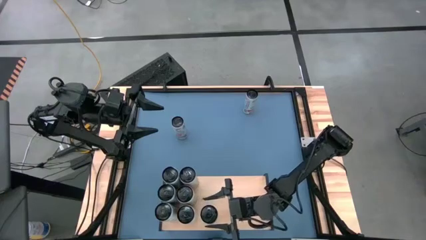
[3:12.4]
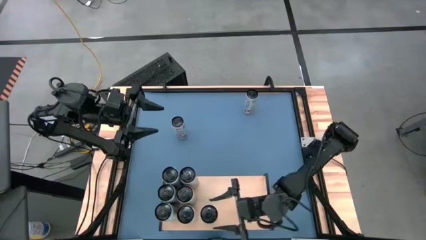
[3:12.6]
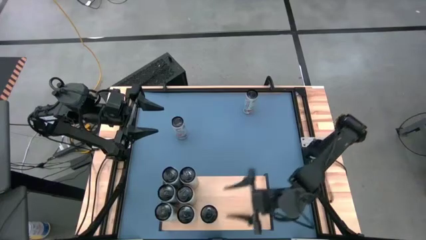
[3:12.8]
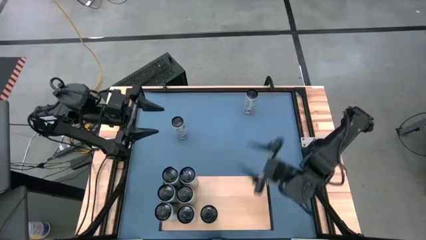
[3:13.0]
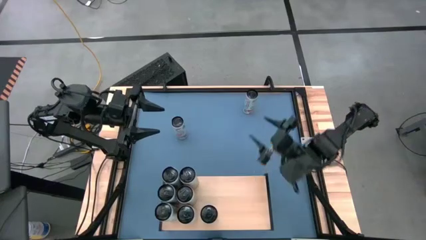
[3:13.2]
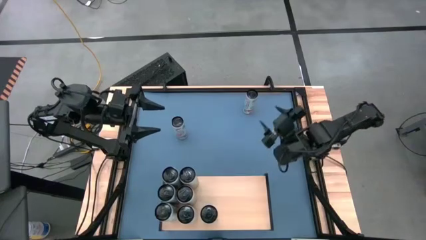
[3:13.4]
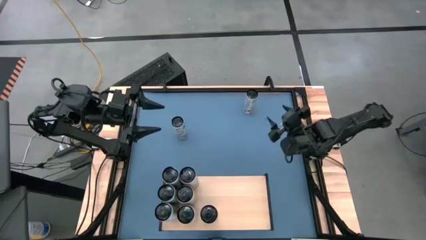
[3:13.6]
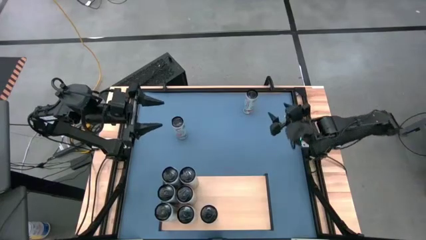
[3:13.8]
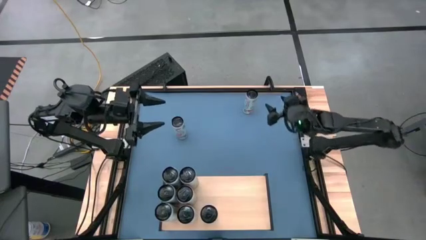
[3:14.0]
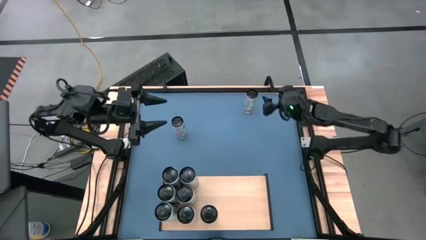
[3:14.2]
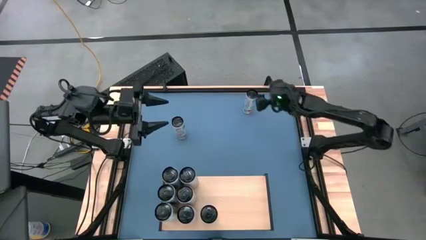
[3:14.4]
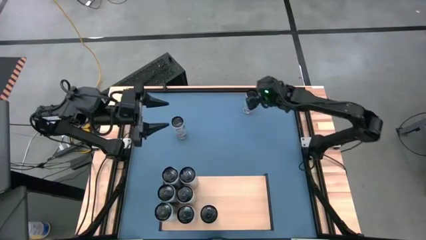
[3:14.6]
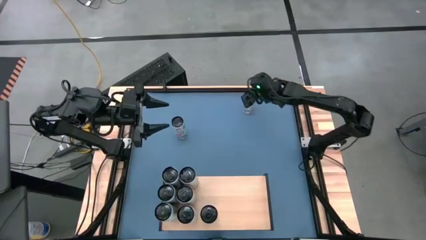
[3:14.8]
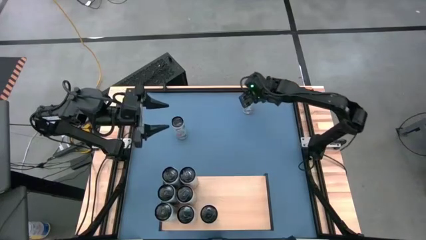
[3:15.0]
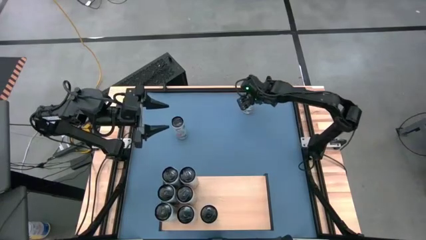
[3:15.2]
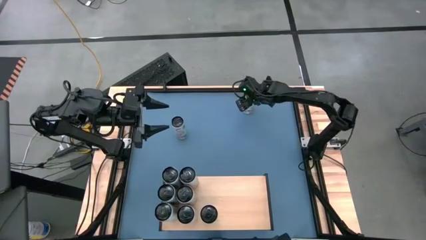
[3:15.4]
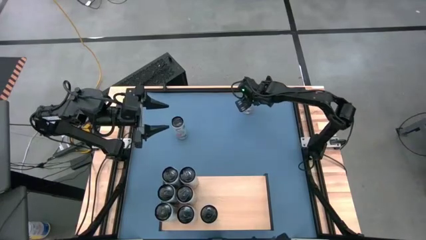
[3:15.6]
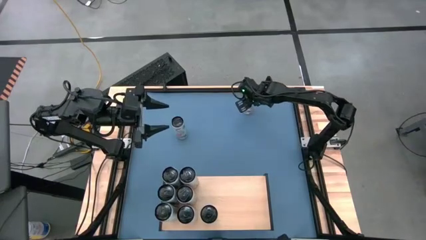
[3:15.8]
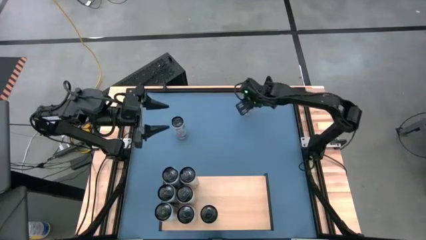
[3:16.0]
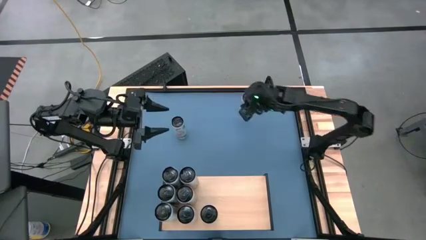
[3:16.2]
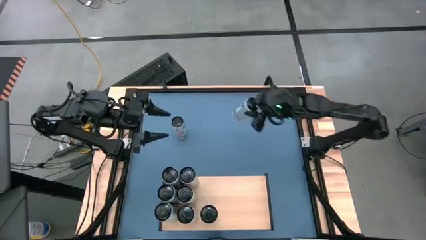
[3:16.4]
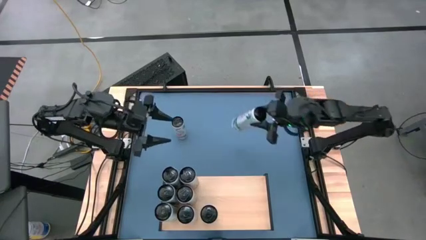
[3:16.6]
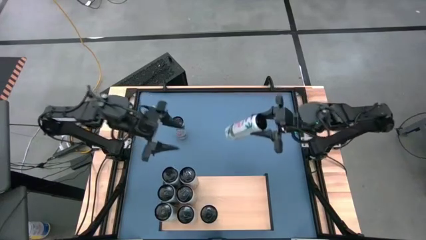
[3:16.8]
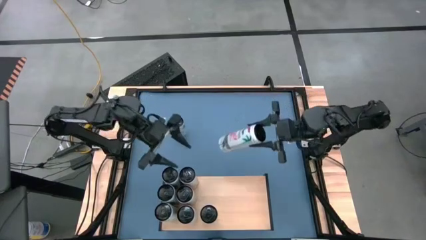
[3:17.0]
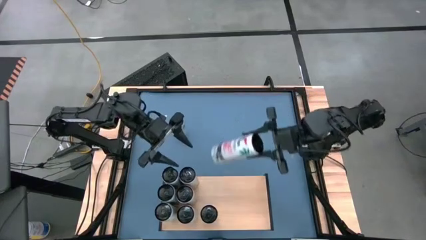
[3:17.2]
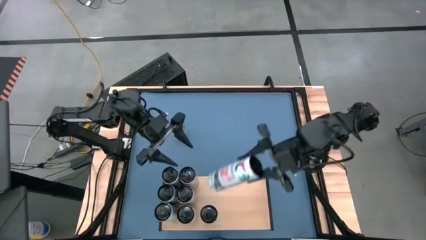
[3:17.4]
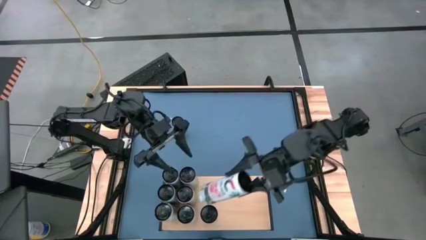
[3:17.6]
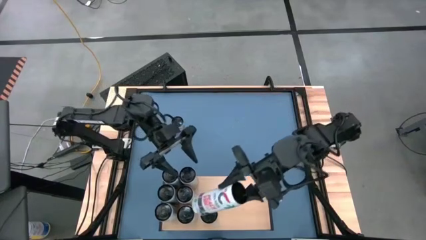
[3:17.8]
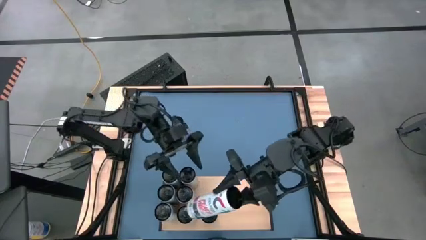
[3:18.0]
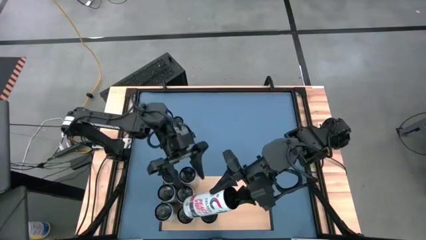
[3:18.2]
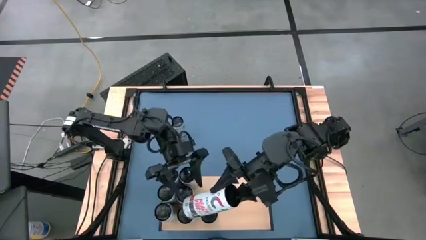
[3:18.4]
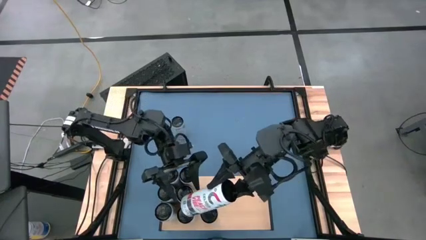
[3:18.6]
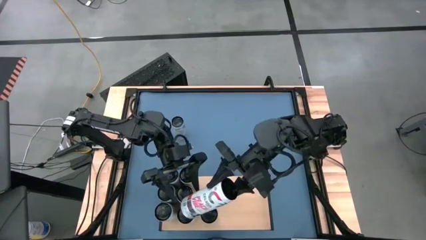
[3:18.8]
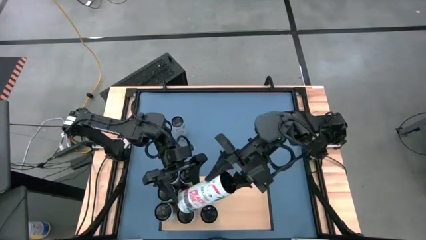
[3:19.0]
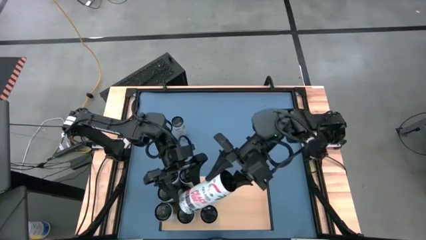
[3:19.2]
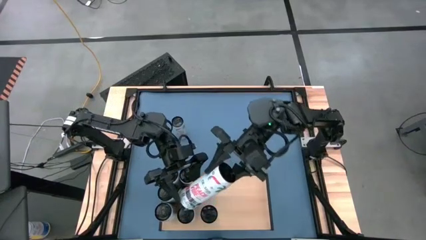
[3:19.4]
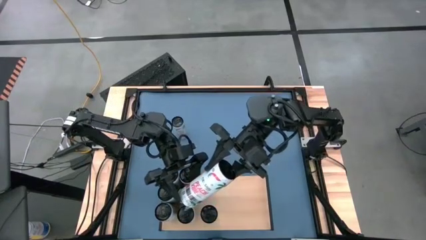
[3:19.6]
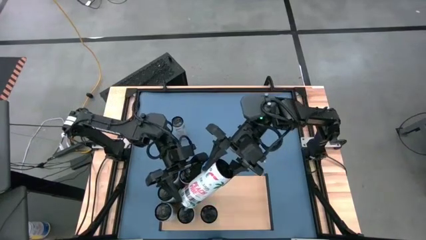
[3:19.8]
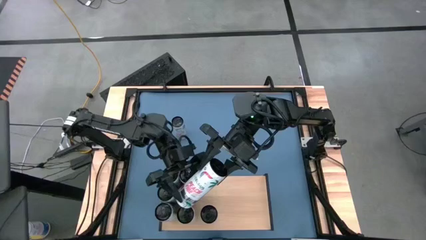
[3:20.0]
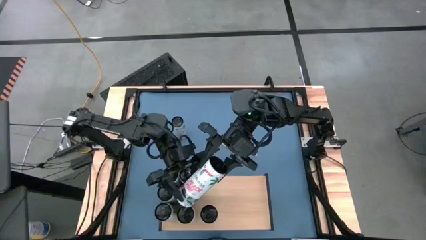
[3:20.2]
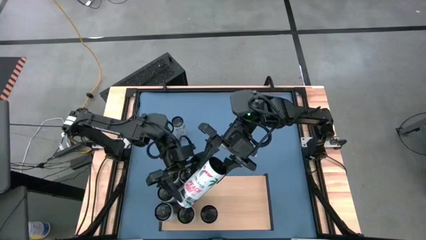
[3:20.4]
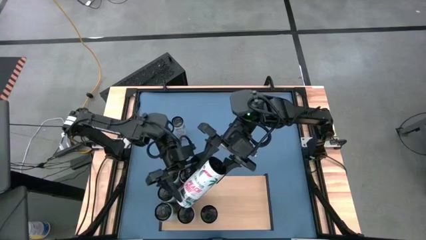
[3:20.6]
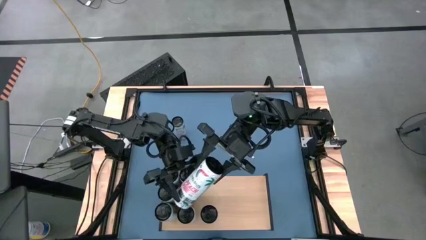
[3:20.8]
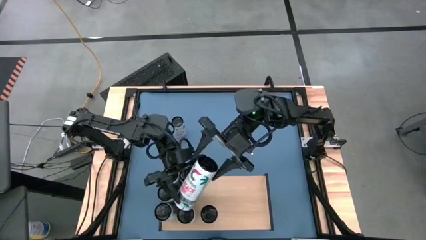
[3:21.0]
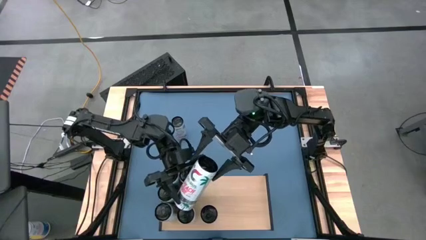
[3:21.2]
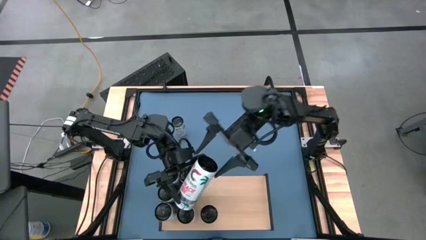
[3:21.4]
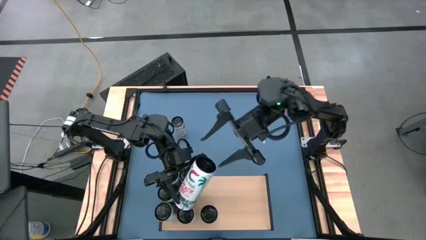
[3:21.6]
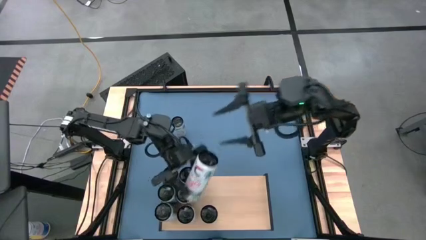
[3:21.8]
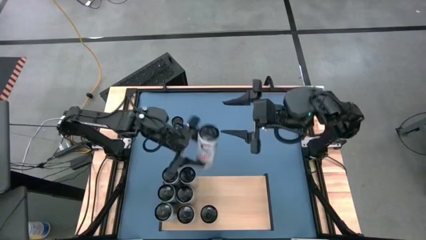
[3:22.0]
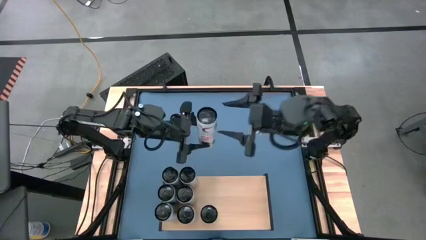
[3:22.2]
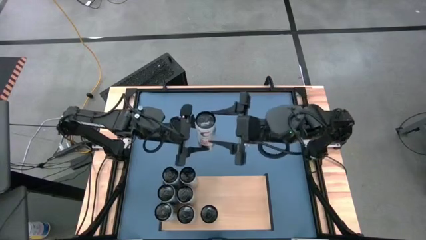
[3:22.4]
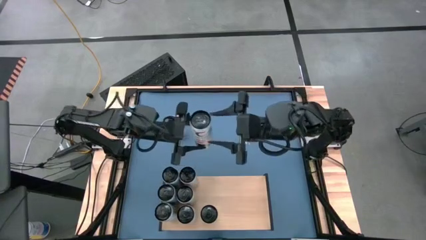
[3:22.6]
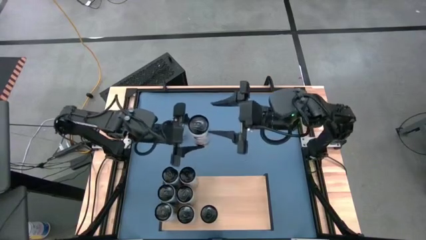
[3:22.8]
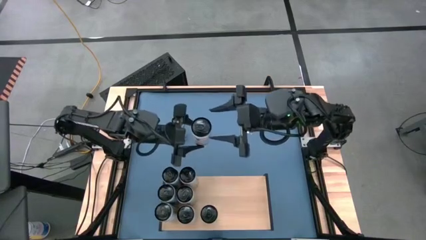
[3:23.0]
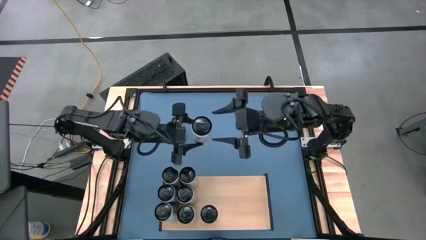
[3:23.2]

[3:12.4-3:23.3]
Task: Place canned beverage on shelf
Put the right white pink soda can on the shelf aligned with the other white pink soda can

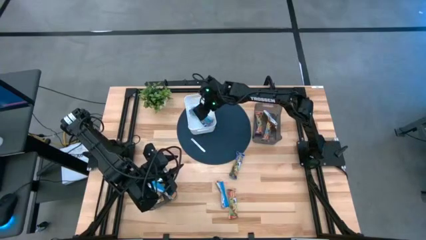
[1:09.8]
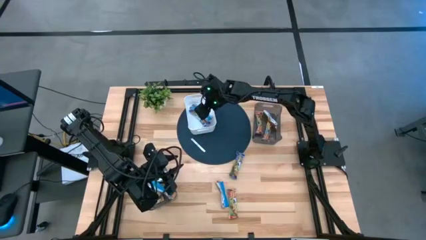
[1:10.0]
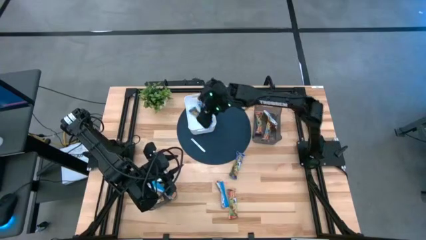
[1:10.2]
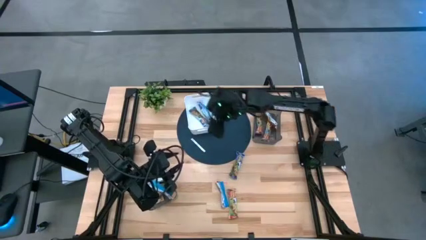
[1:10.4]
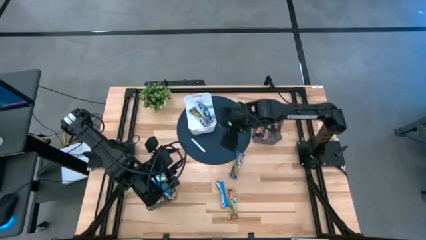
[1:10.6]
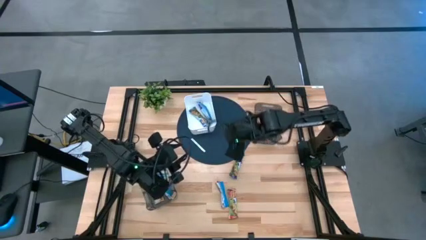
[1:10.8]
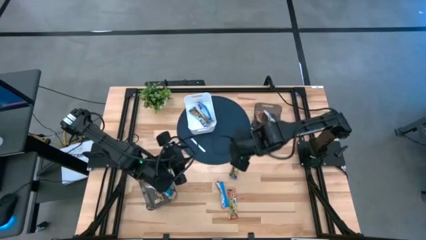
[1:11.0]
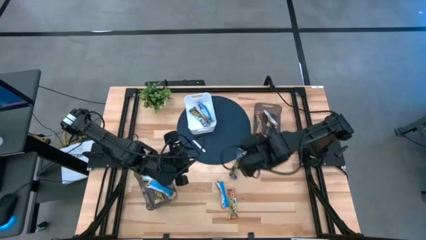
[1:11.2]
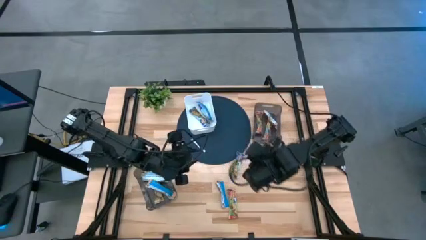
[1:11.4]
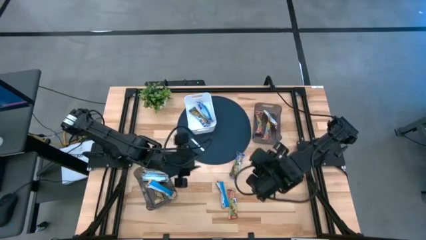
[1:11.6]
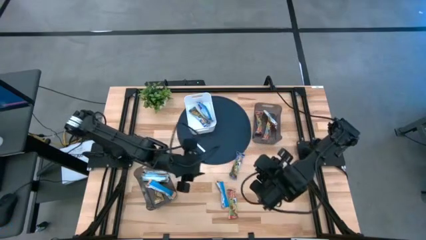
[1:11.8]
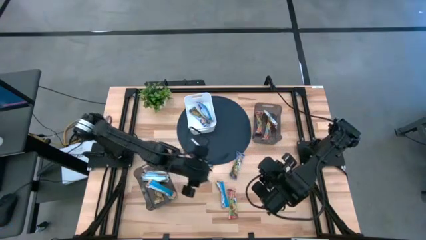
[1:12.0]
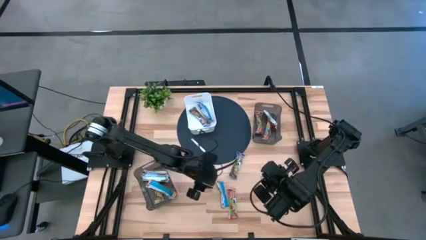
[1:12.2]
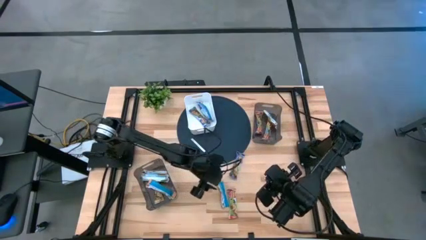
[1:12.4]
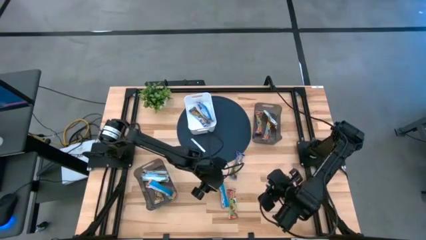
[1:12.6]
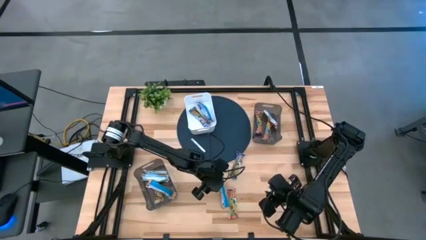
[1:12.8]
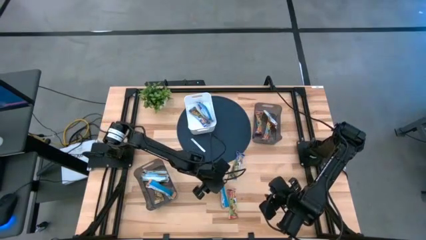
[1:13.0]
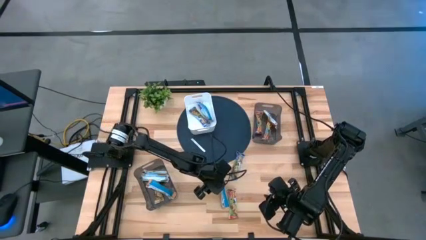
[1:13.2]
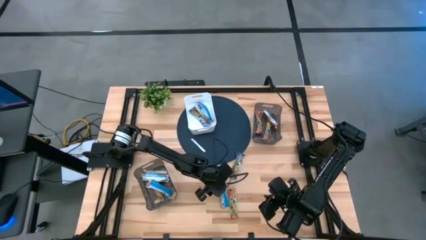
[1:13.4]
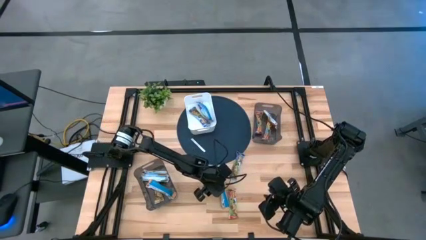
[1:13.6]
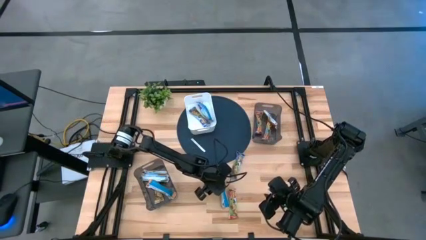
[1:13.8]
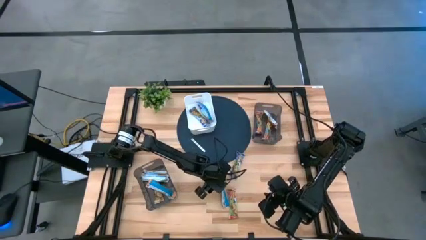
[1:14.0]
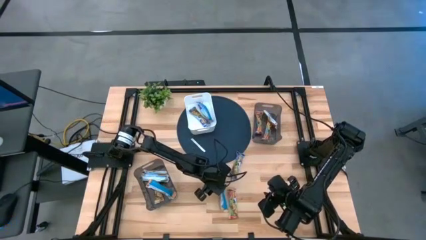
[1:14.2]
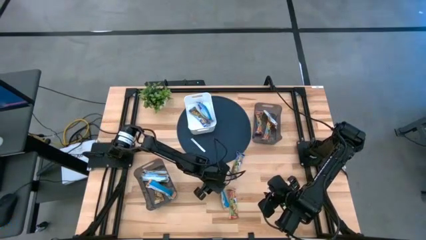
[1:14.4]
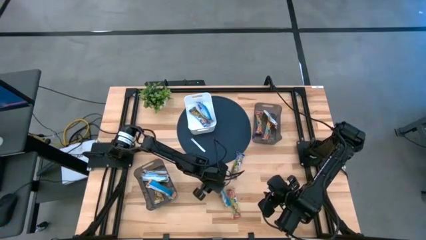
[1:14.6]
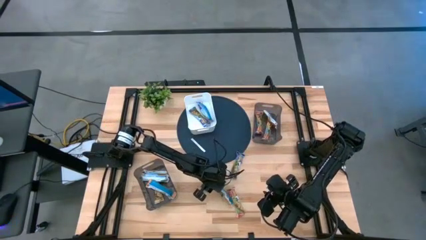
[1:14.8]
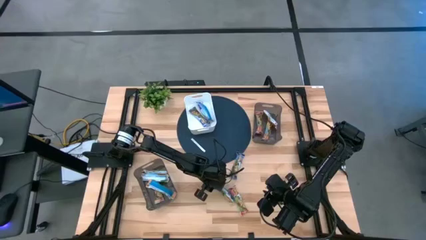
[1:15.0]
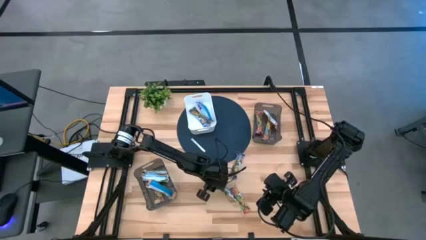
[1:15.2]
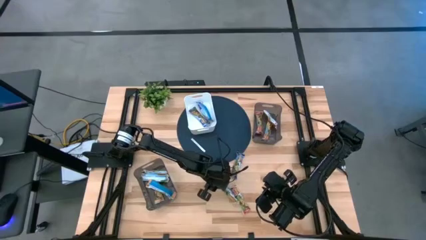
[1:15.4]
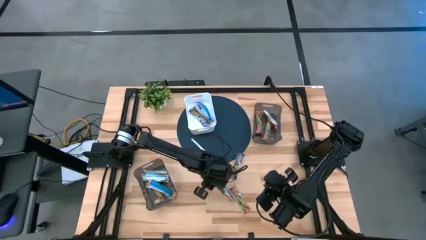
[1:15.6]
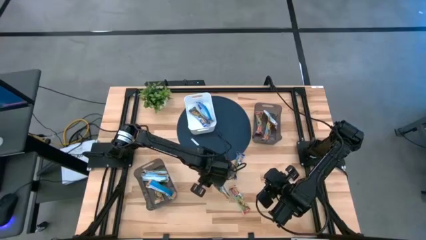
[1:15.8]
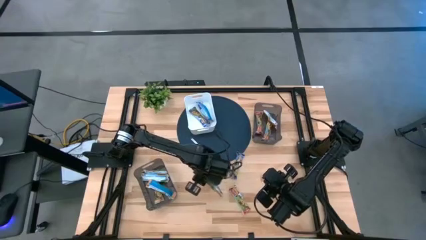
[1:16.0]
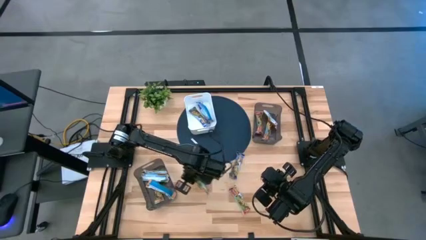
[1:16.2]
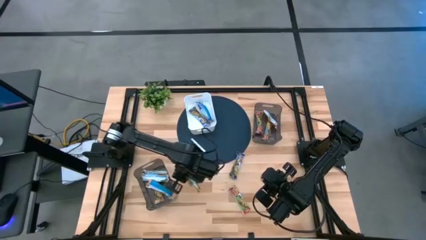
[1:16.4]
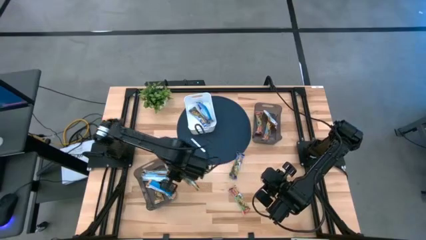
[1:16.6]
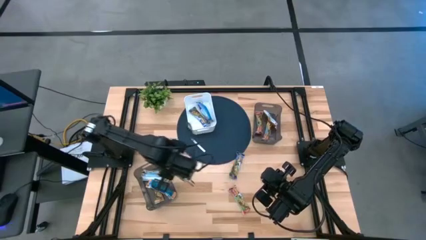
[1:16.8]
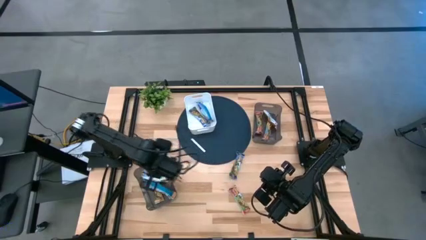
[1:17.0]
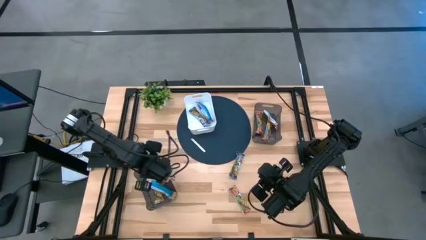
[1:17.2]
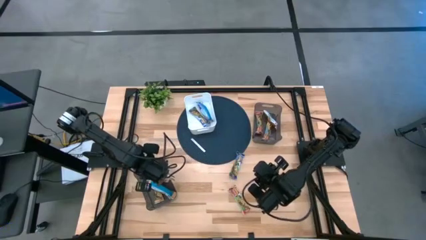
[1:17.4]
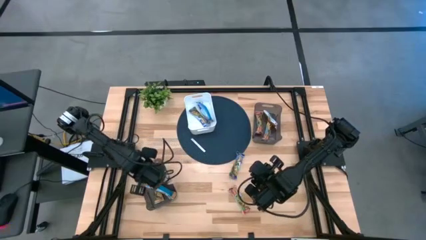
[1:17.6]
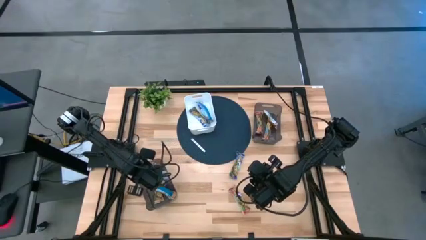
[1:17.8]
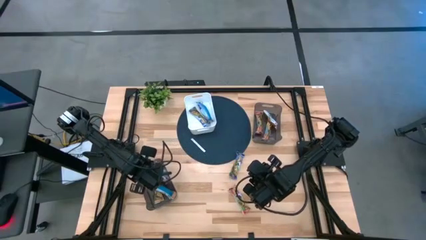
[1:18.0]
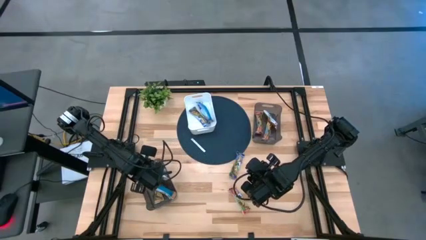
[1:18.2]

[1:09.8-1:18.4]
Task: Pick and place Granola Bars by type
Put the yellow granola bar into the bottom black bin
